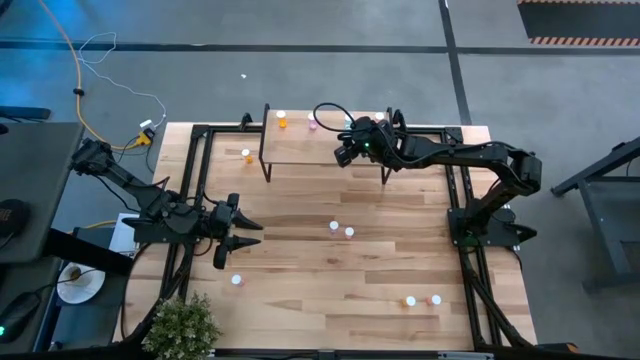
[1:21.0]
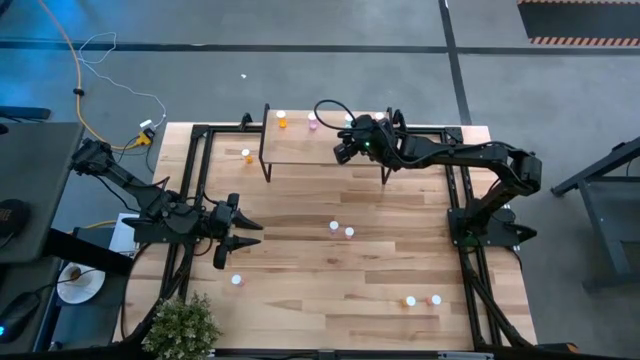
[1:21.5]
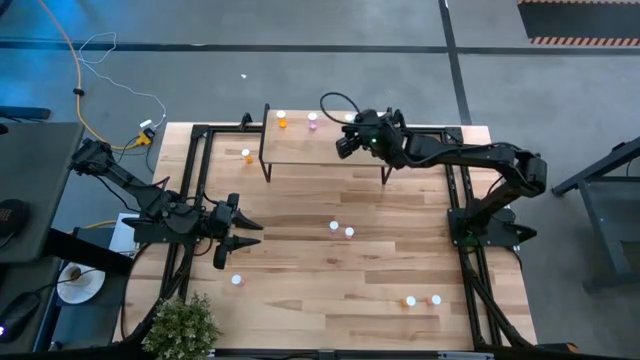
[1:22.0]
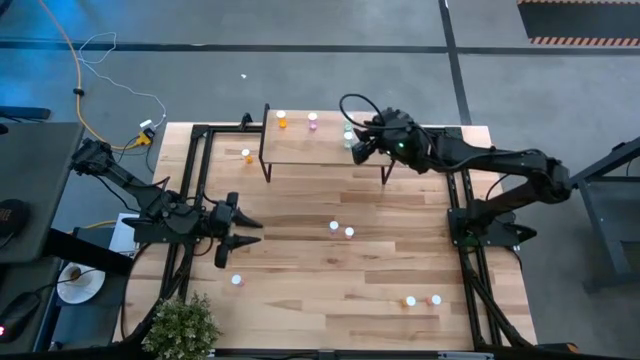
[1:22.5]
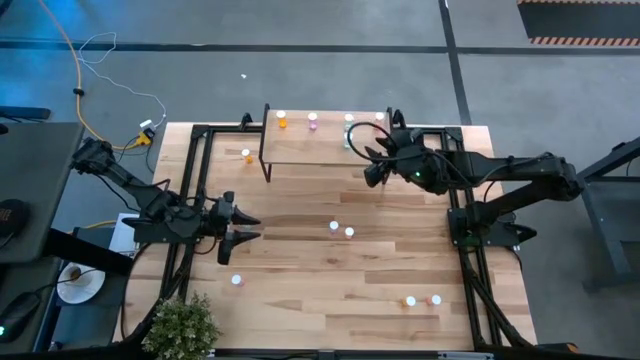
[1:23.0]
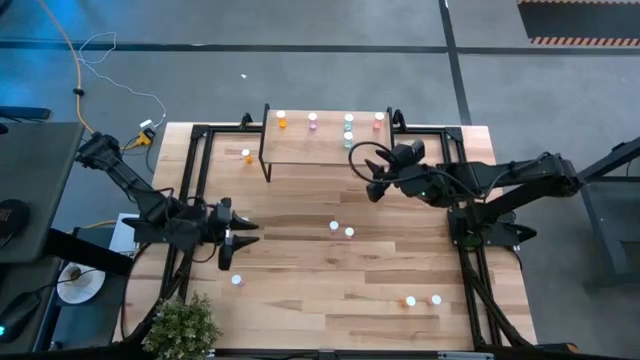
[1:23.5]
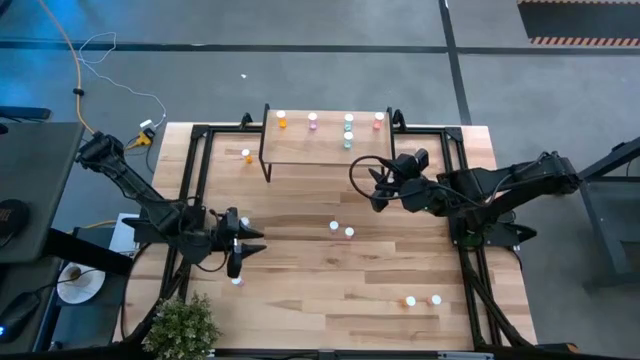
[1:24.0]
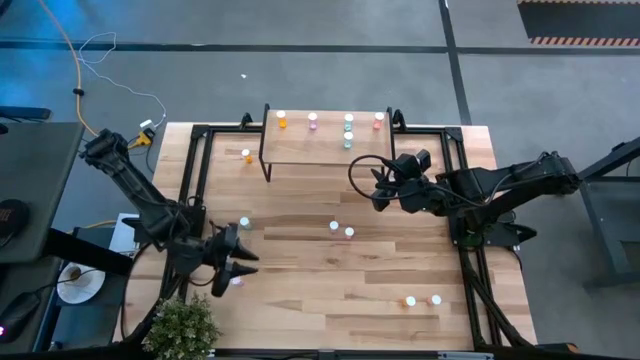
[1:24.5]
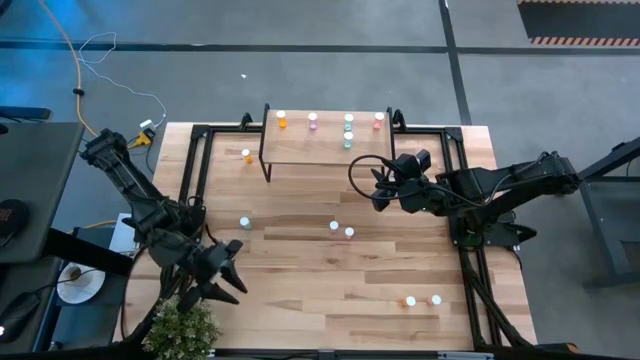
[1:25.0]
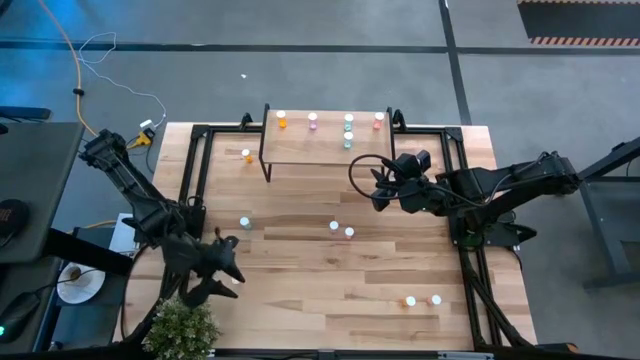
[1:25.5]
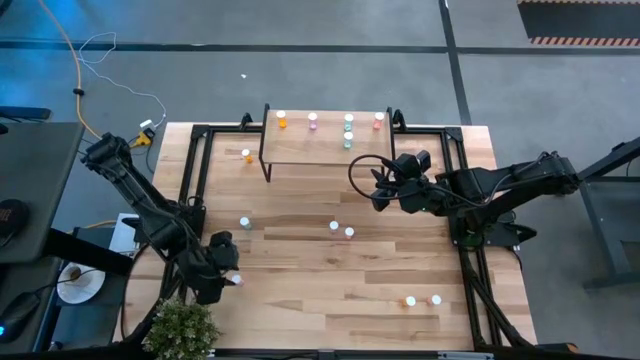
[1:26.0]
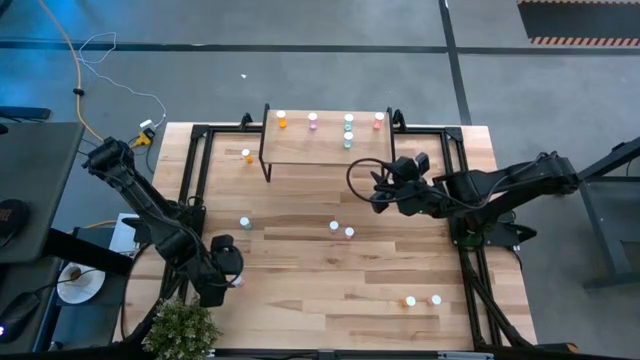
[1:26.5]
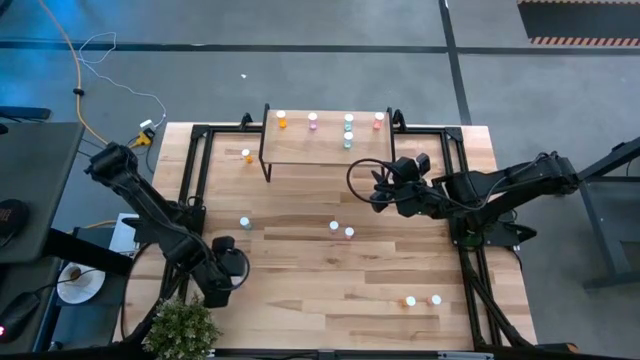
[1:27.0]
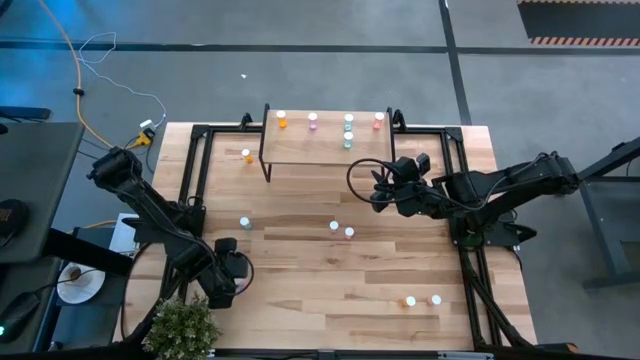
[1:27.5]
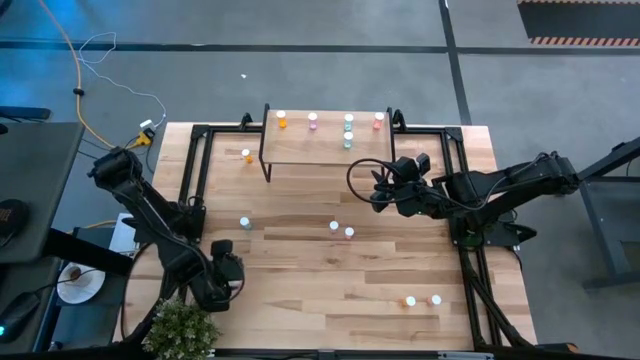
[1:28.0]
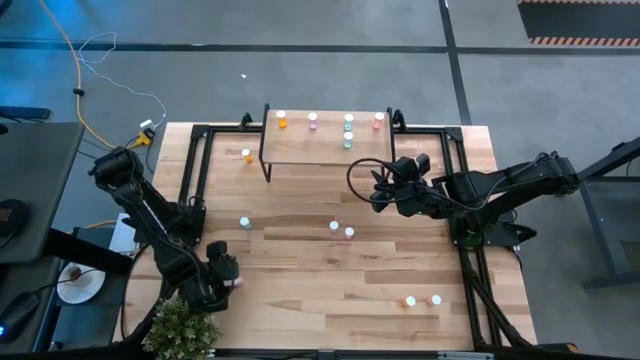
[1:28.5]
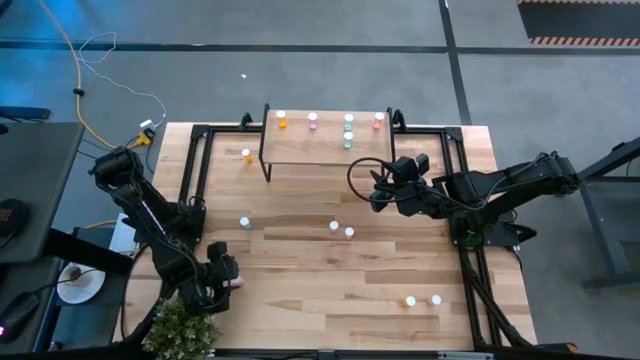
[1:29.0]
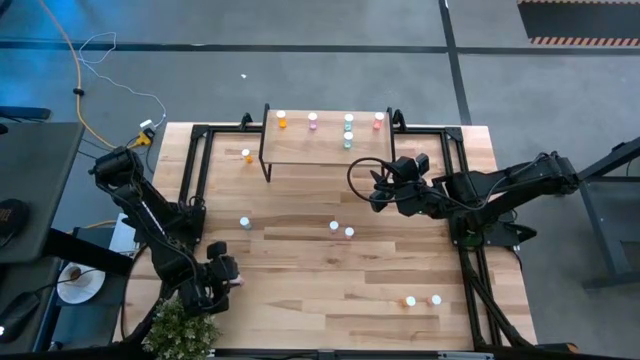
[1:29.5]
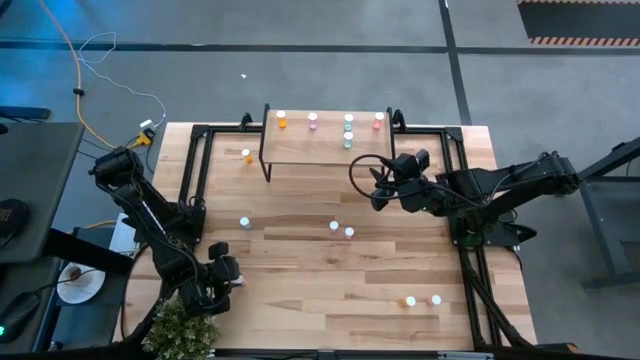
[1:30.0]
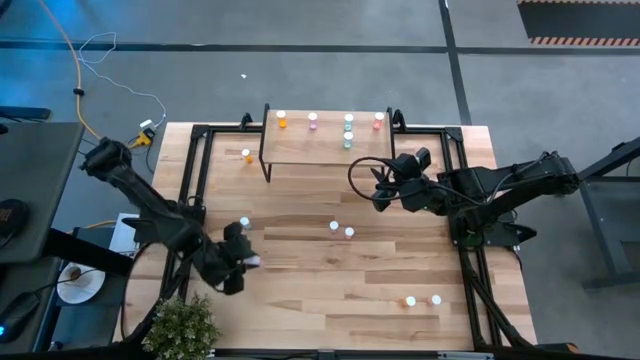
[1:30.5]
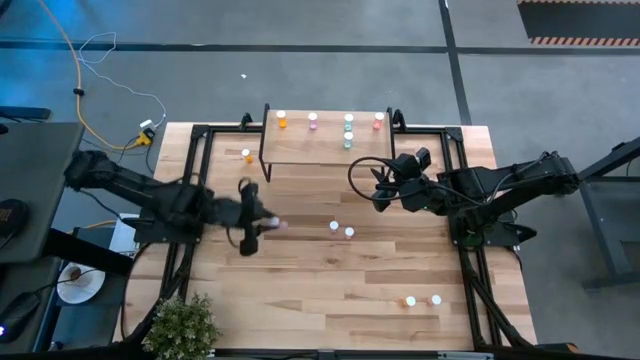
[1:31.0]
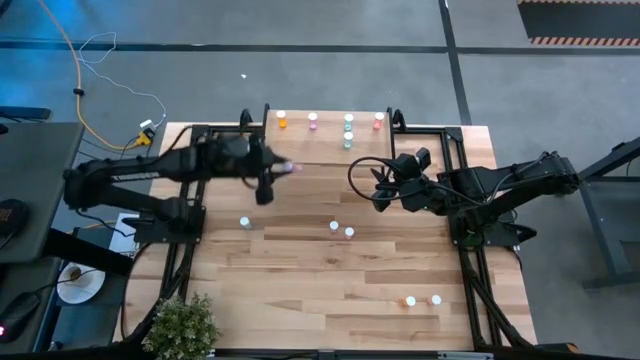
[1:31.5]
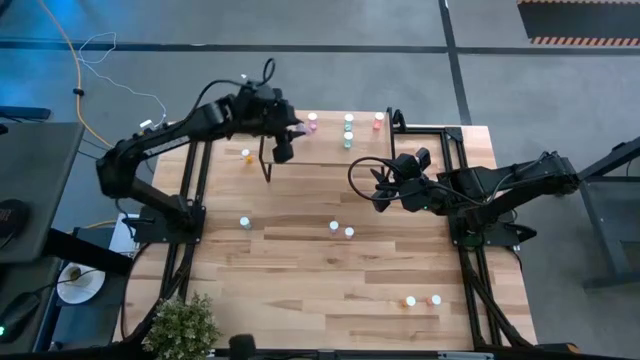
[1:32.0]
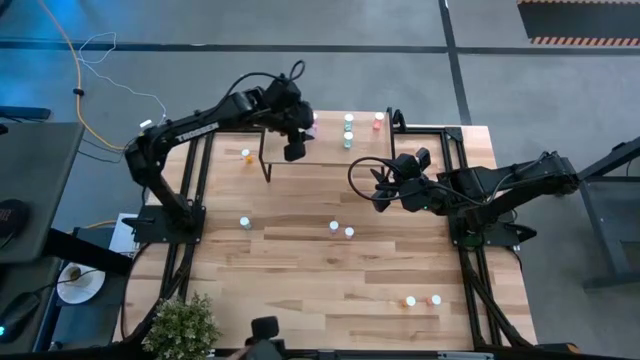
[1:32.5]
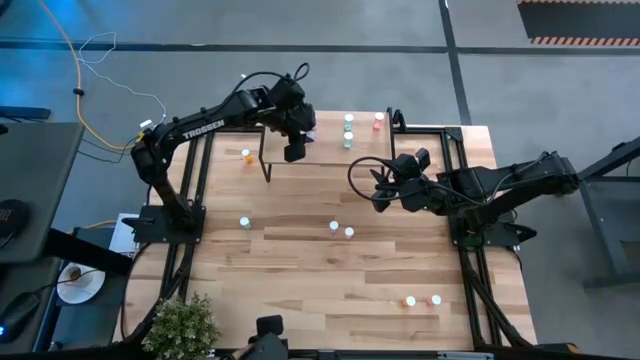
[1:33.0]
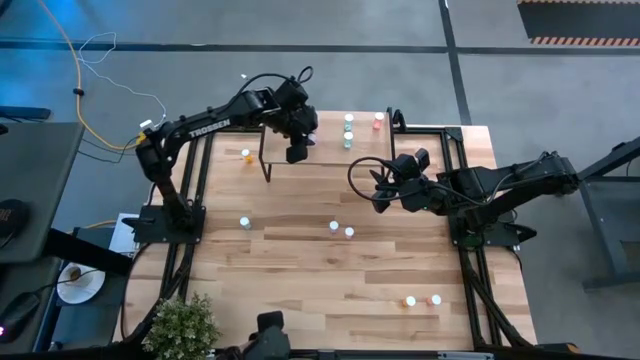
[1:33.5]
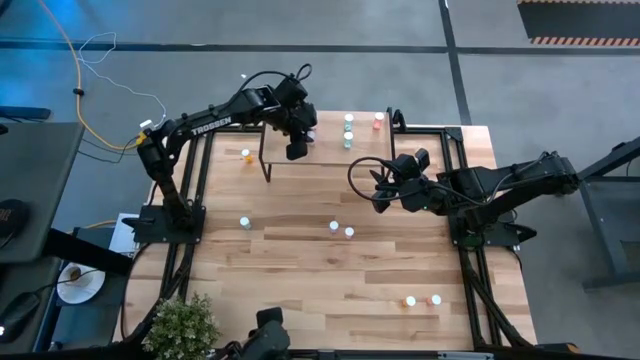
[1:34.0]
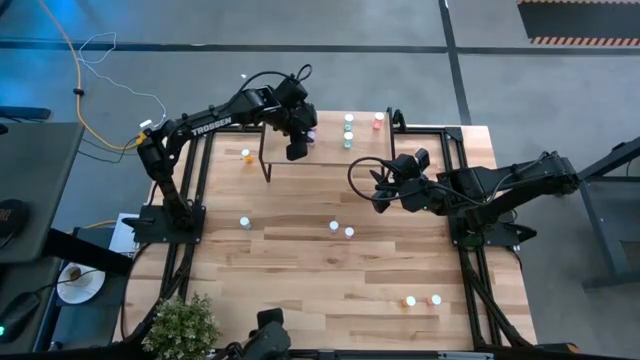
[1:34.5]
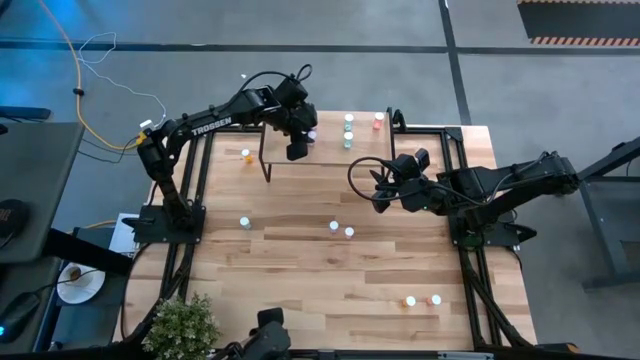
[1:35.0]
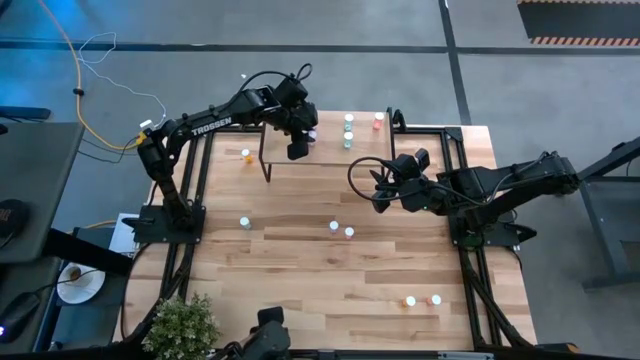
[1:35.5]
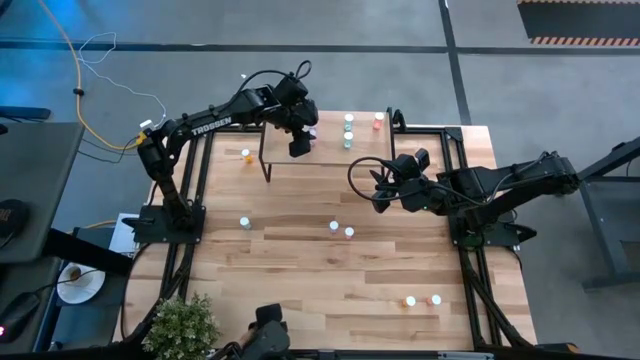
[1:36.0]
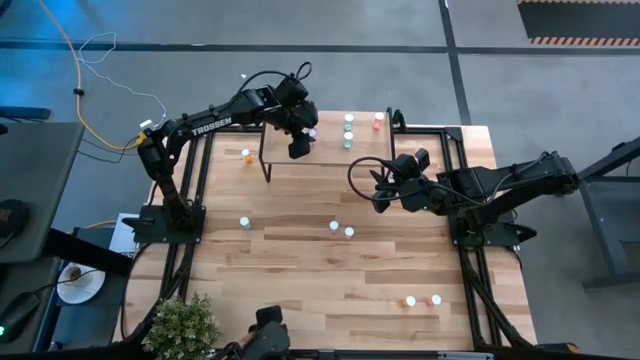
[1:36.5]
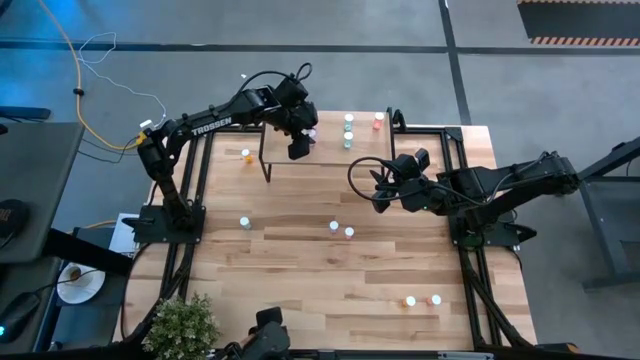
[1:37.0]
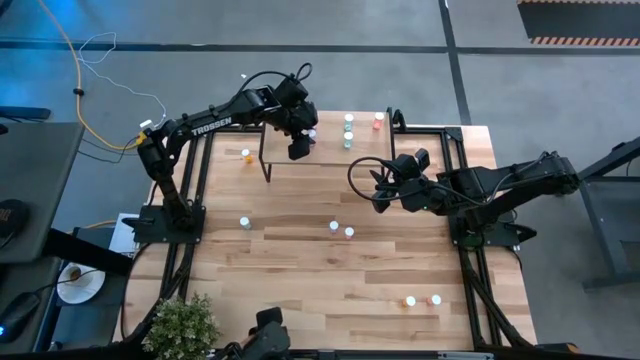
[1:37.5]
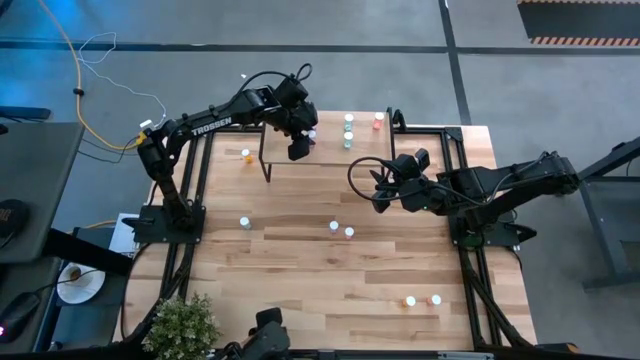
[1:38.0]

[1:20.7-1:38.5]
Task: Pick and place medicine bottles onto shelf by color
Put the bottom purple pill bottle on the shelf aligned with the other purple pill bottle

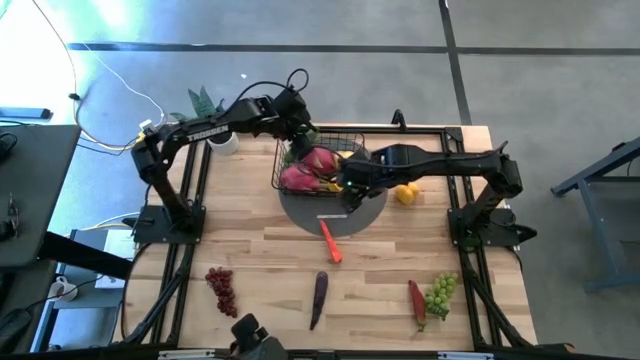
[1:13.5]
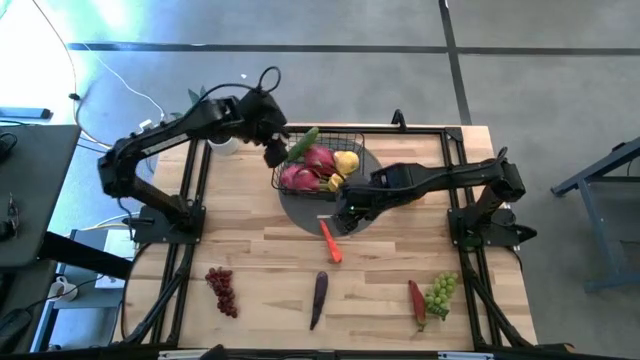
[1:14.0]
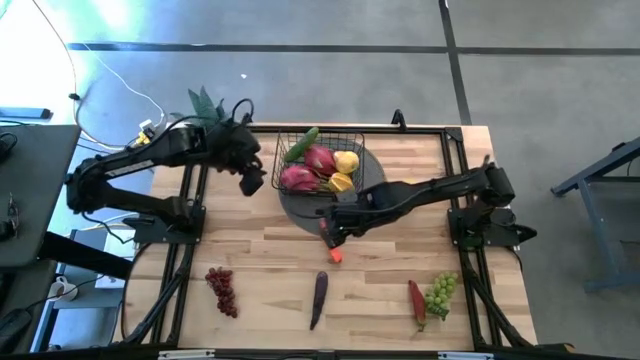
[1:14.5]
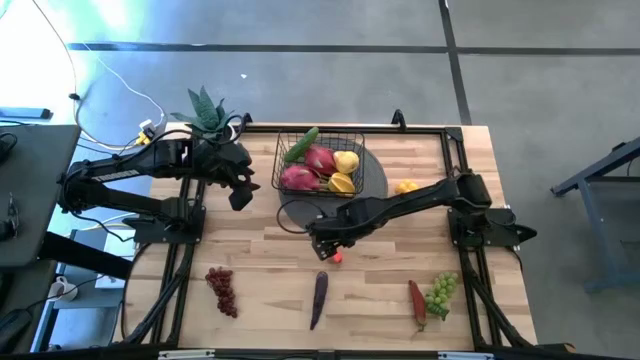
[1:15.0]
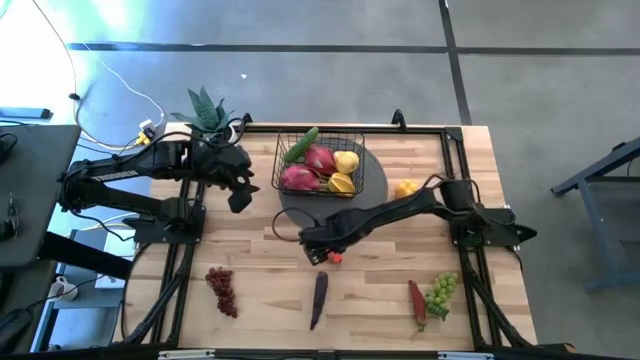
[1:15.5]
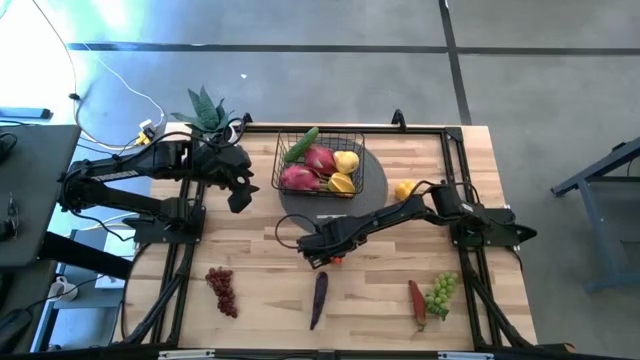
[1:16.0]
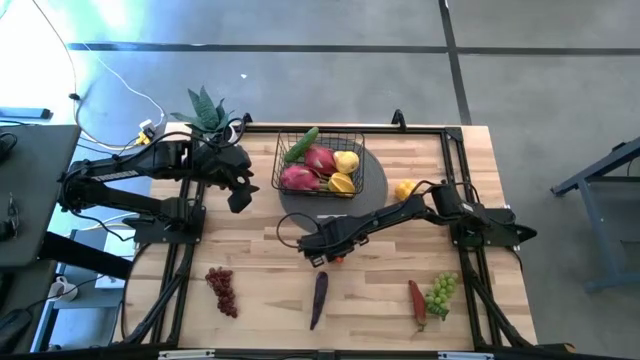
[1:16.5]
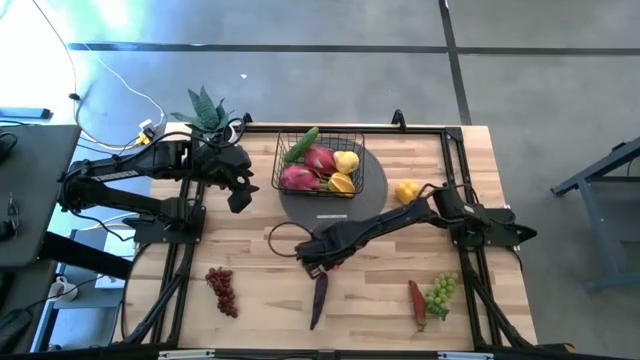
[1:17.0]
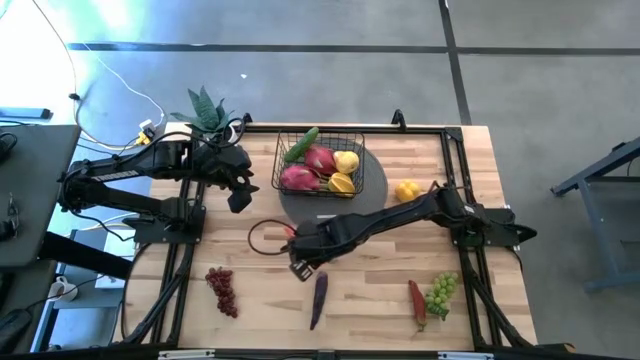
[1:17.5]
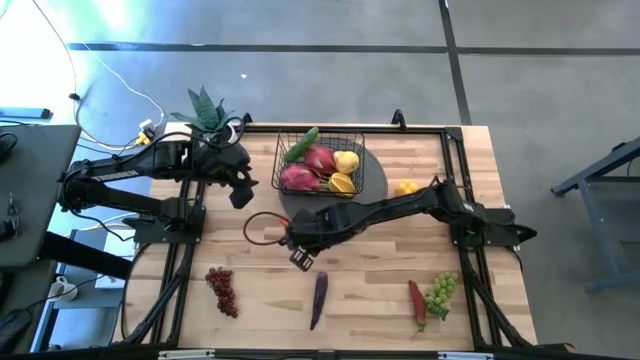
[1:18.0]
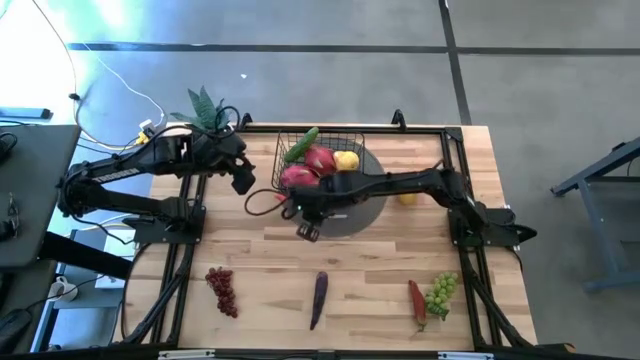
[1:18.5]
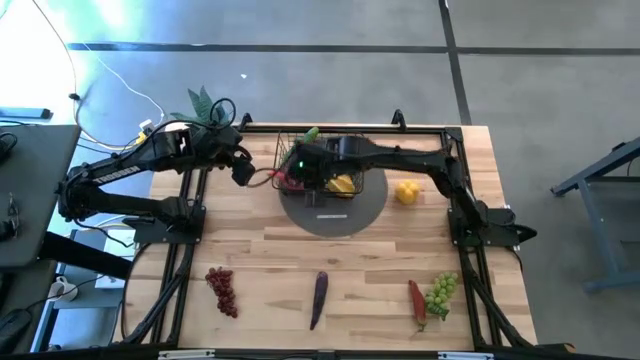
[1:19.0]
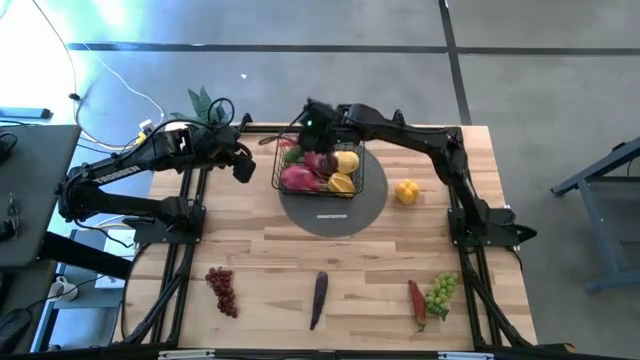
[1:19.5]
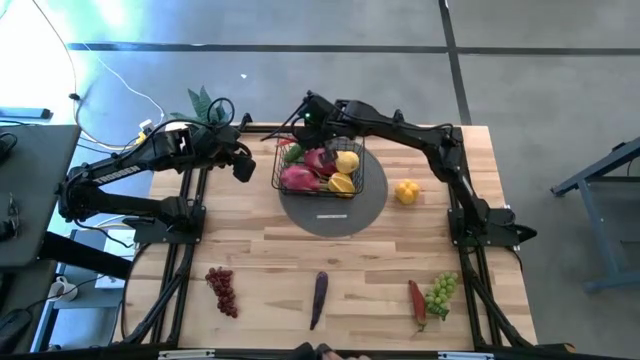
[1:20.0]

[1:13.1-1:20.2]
Task: Build produce basket
Put the orange carrot into the black wire basket
